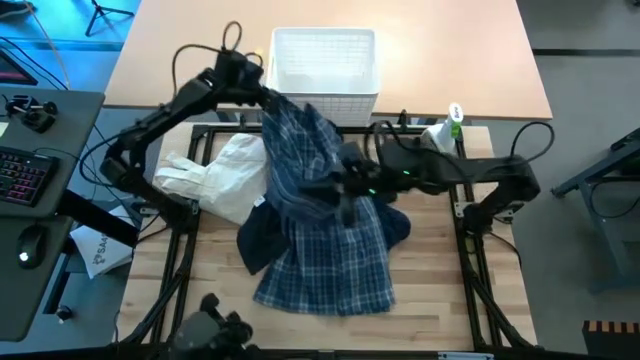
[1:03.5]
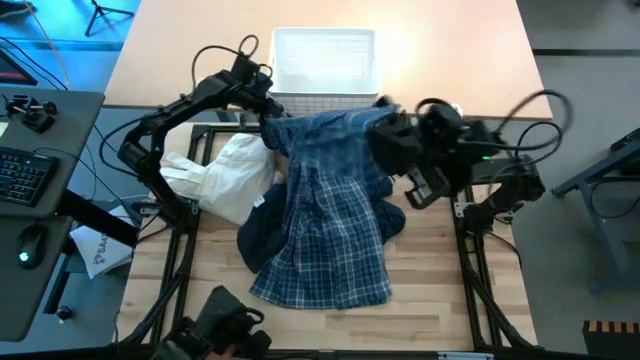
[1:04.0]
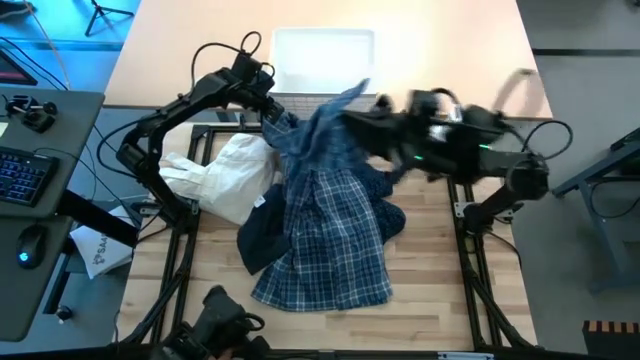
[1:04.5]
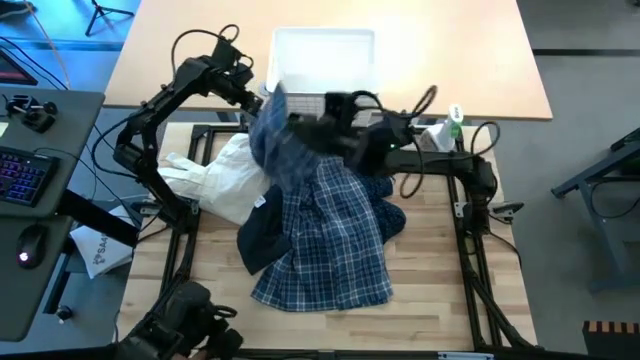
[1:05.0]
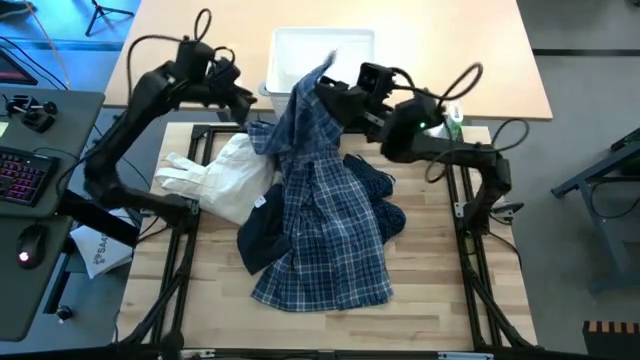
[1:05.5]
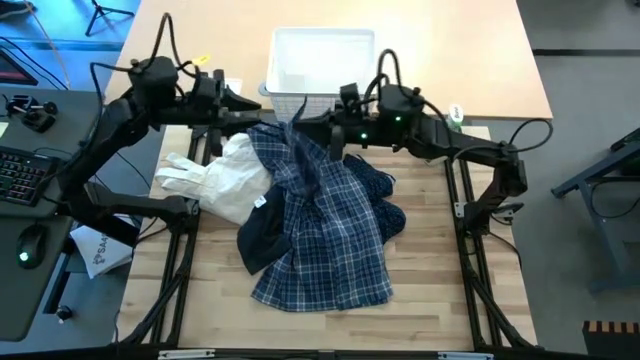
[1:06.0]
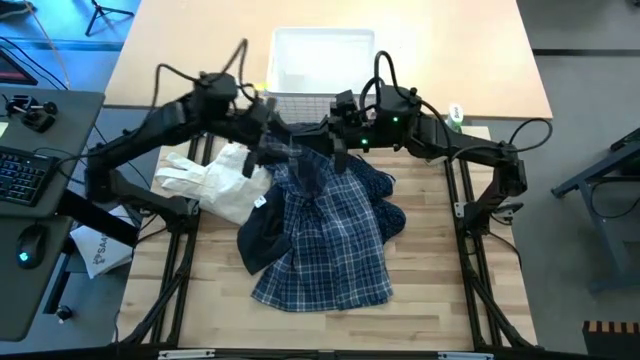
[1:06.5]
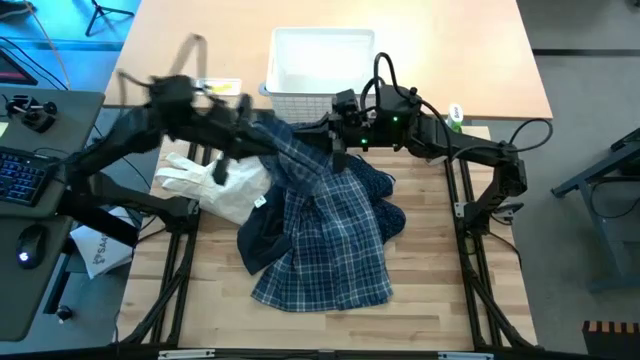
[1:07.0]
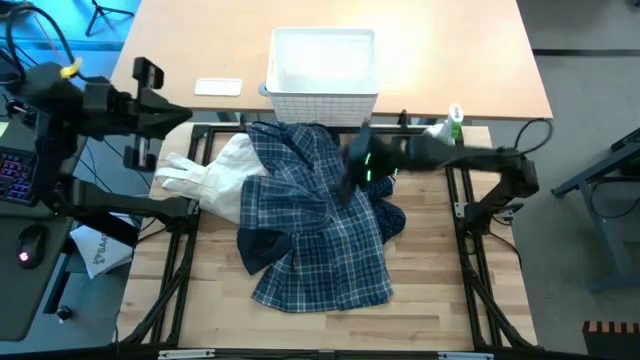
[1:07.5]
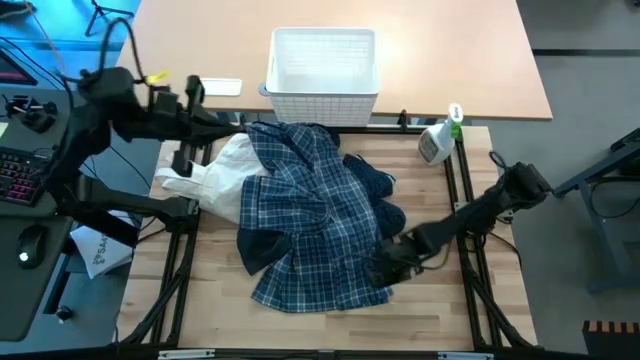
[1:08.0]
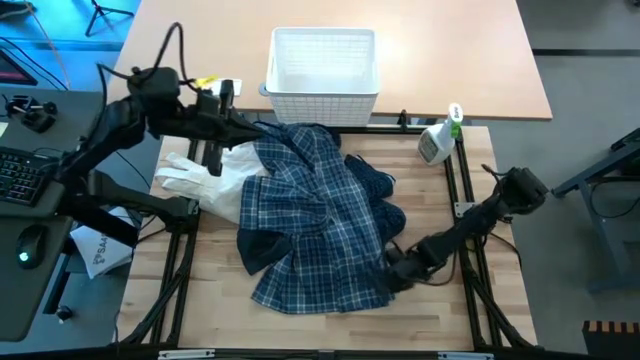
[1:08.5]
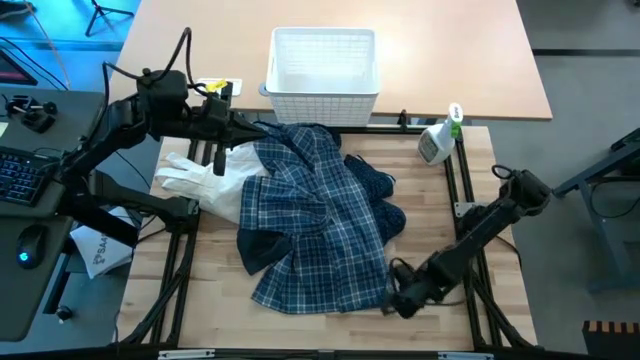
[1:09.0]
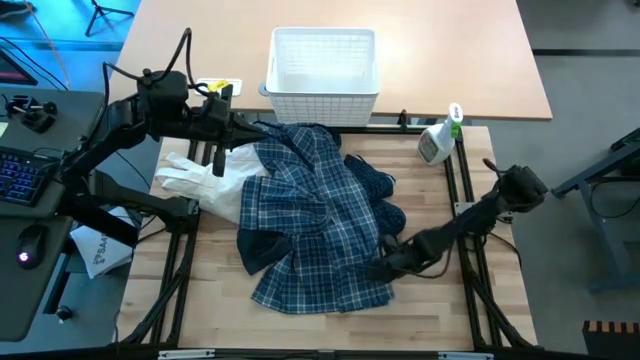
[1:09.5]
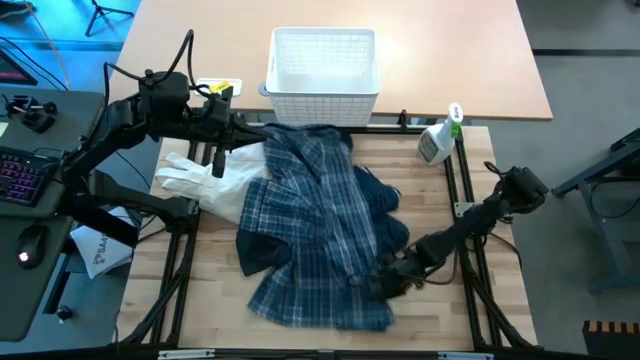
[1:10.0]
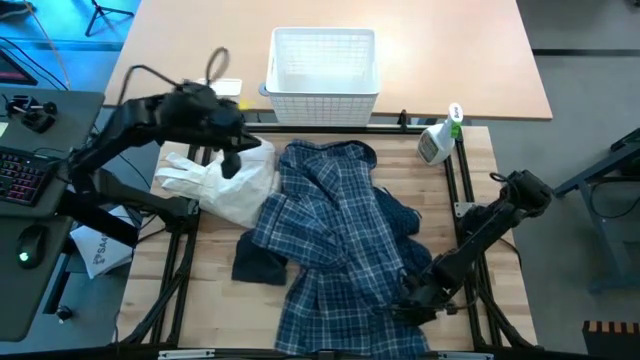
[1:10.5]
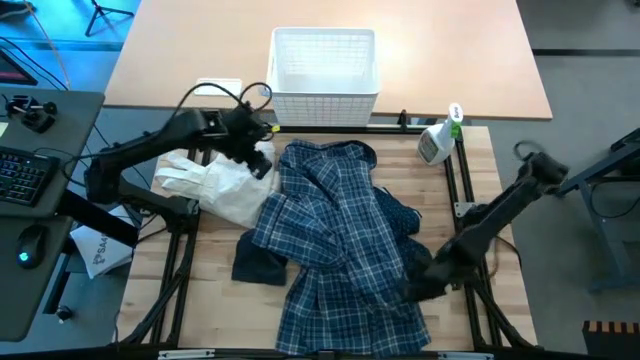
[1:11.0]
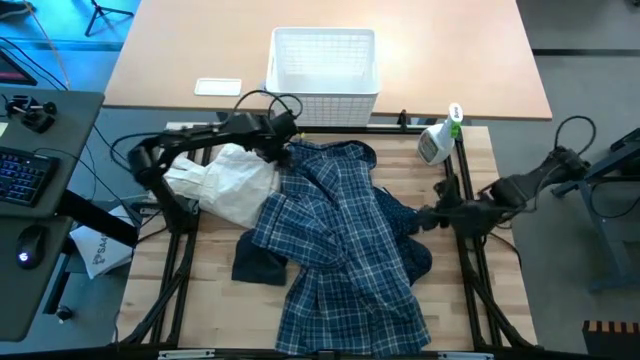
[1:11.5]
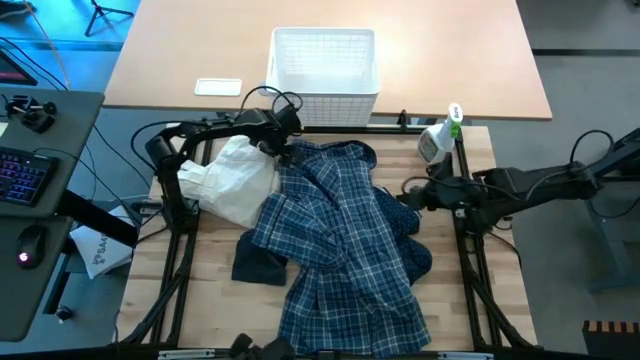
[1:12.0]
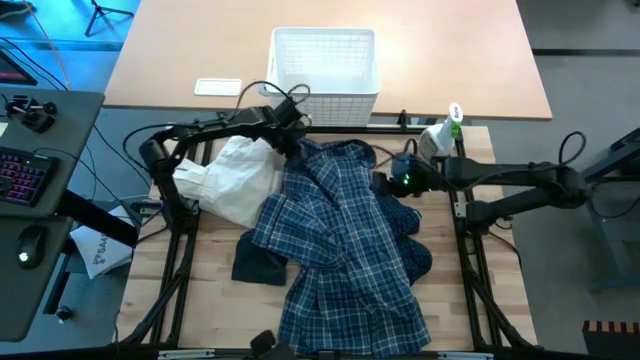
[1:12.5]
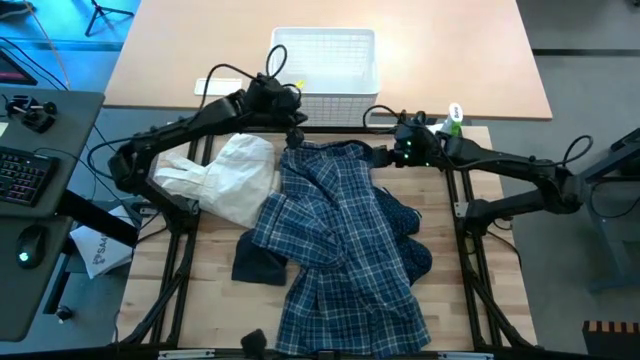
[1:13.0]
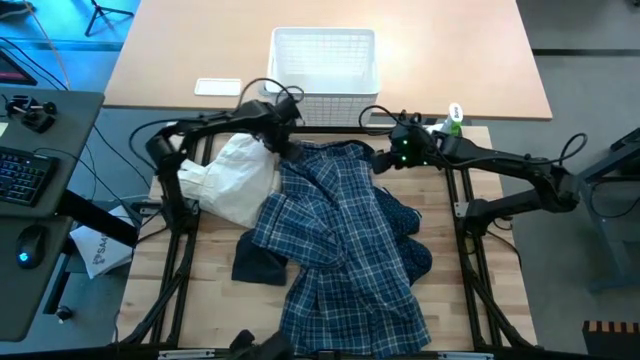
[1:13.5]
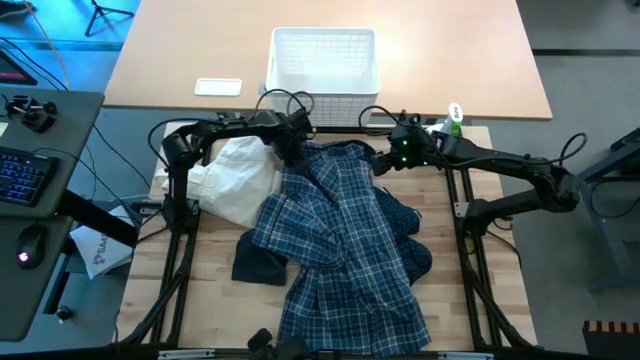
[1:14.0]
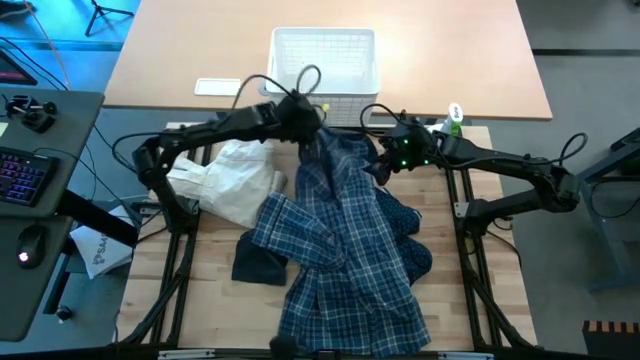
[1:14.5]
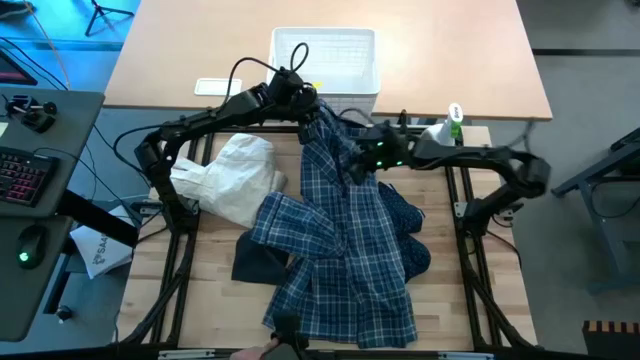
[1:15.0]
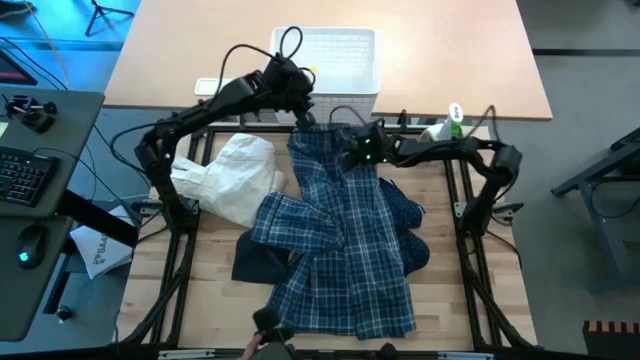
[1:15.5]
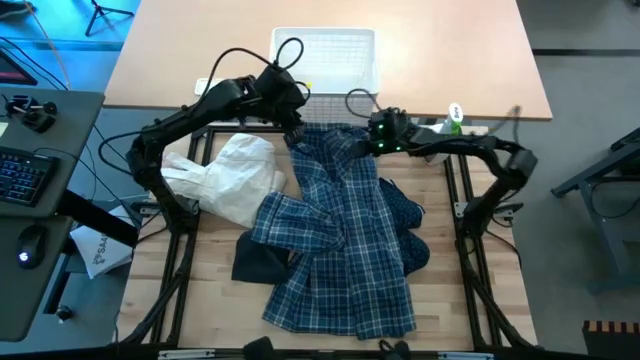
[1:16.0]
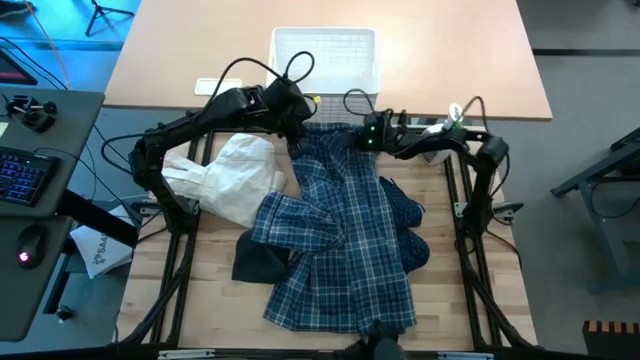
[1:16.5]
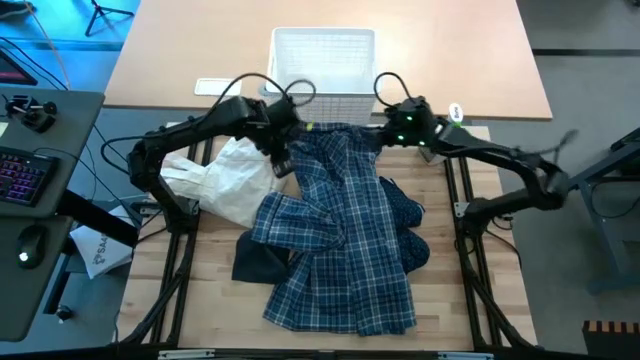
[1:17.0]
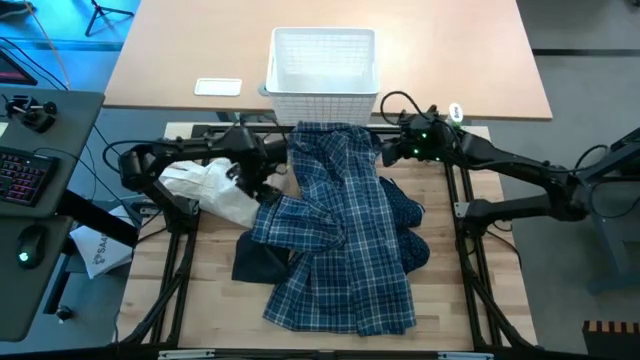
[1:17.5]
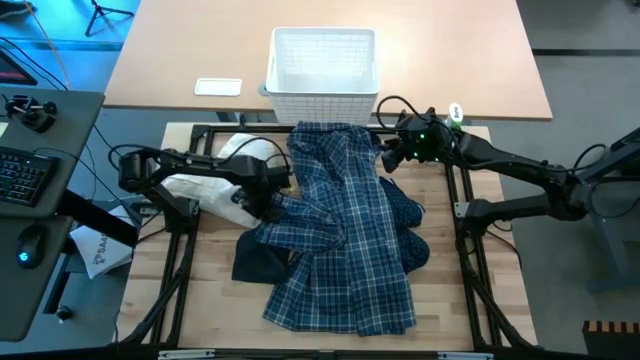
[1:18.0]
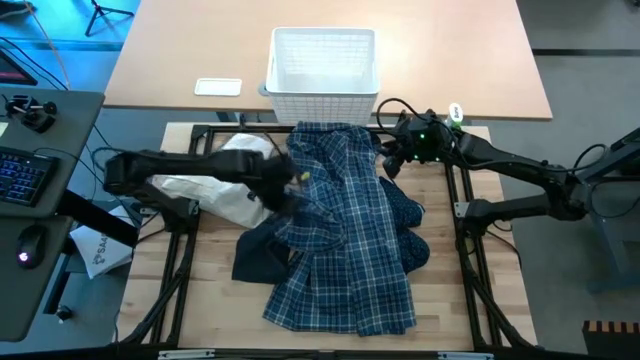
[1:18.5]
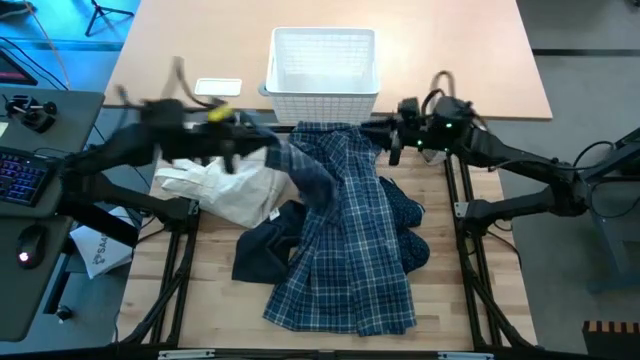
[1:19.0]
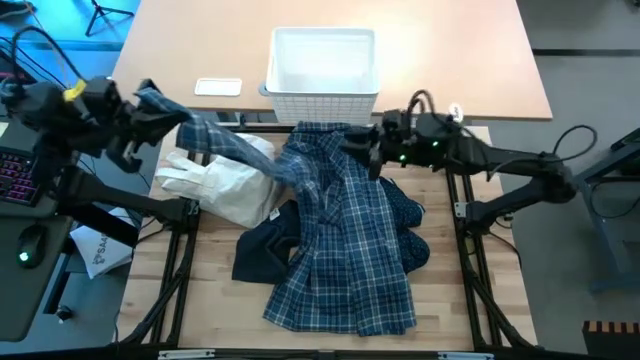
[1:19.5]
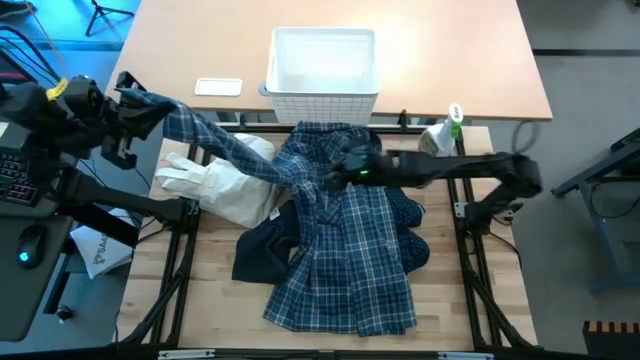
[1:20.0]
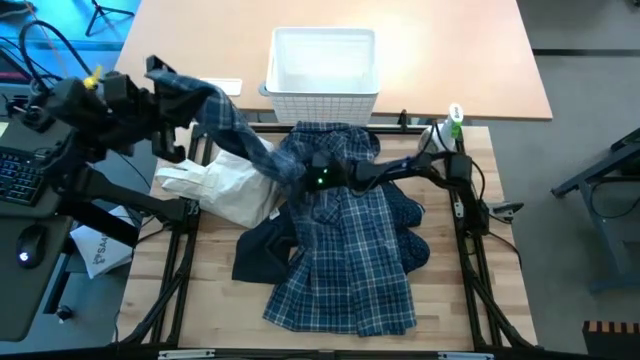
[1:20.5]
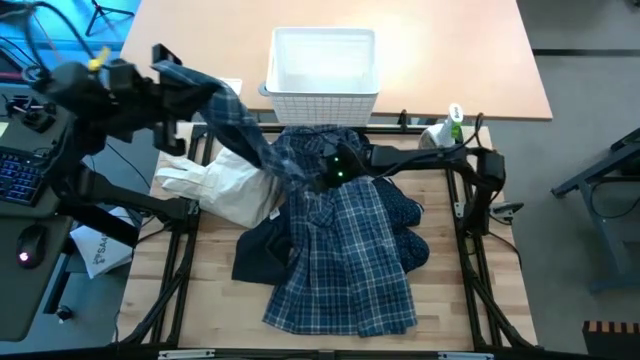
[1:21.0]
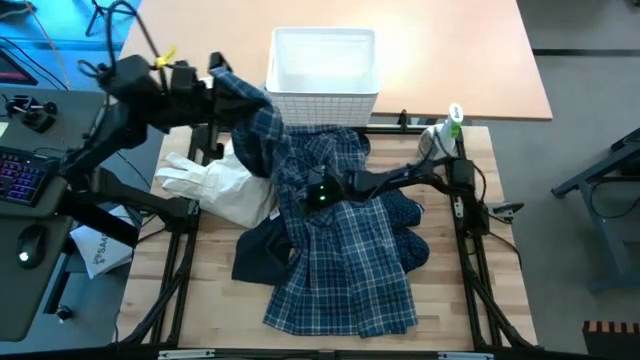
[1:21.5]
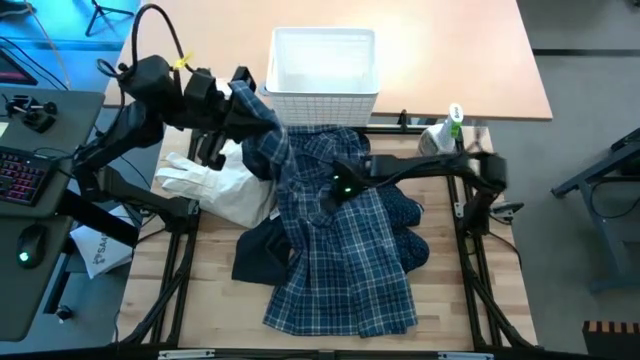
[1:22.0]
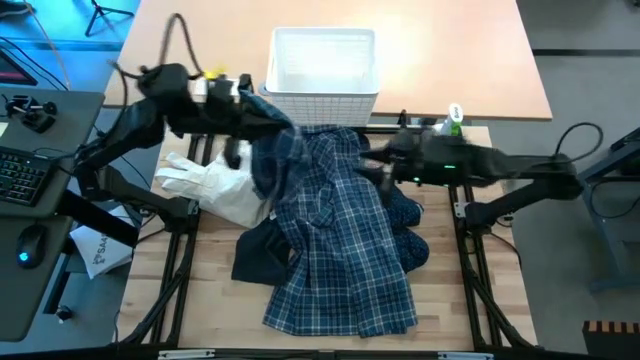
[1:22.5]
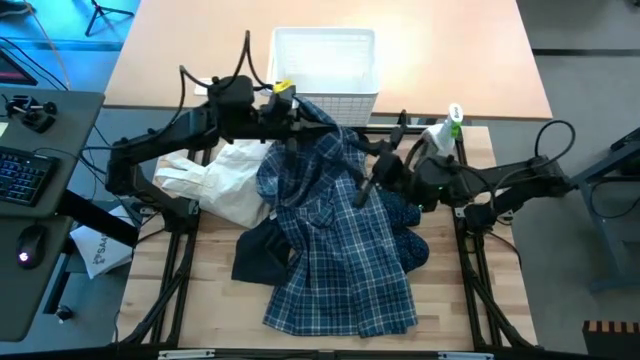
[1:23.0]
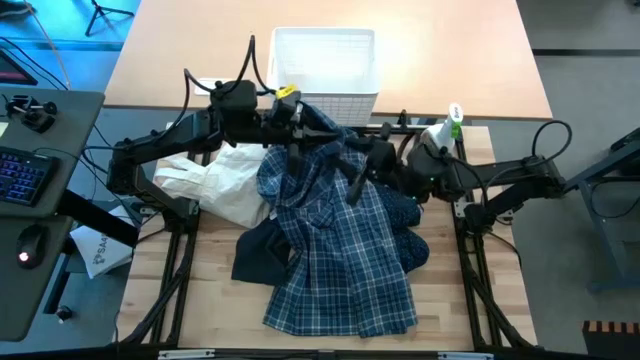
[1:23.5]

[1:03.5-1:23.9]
Task: Fold laundry
Fold the blue plaid flannel shirt

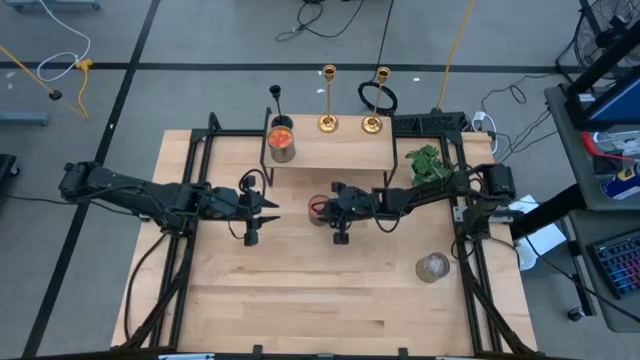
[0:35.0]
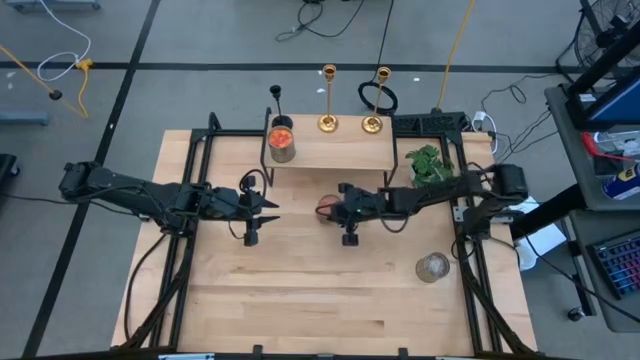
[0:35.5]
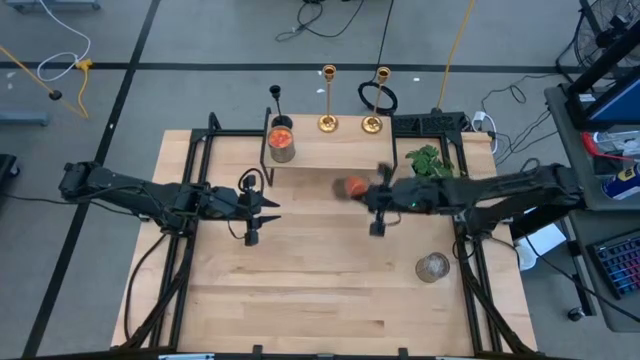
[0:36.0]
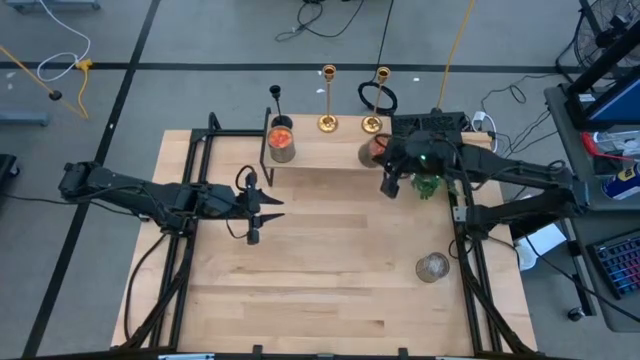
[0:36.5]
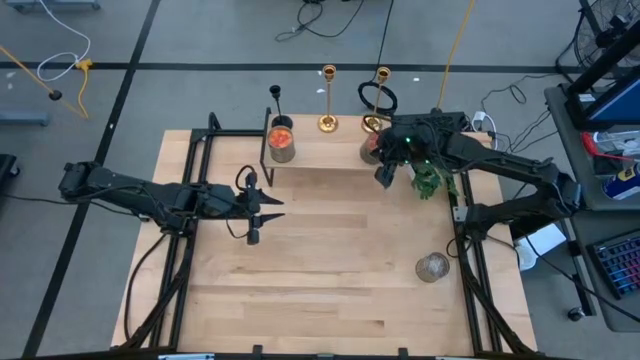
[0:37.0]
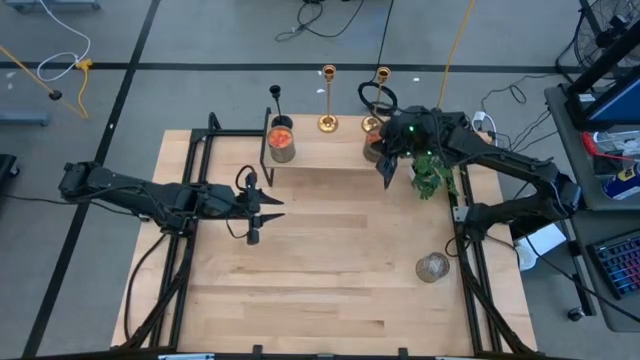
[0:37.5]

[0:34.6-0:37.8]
Task: Pick & Place candle stick holders
Put the orange scented candle on the shelf
